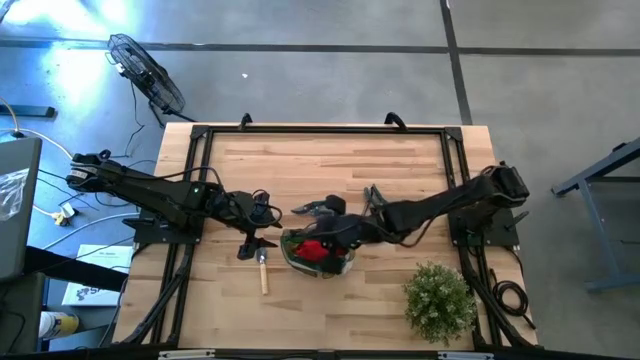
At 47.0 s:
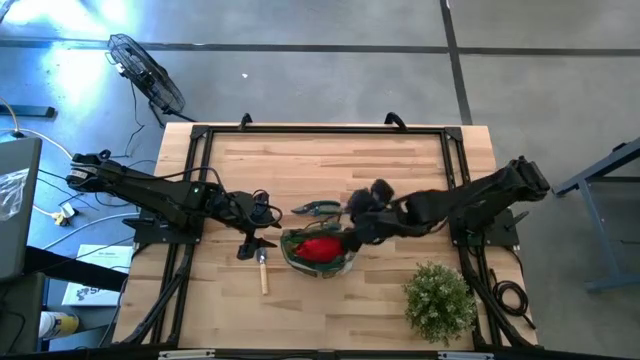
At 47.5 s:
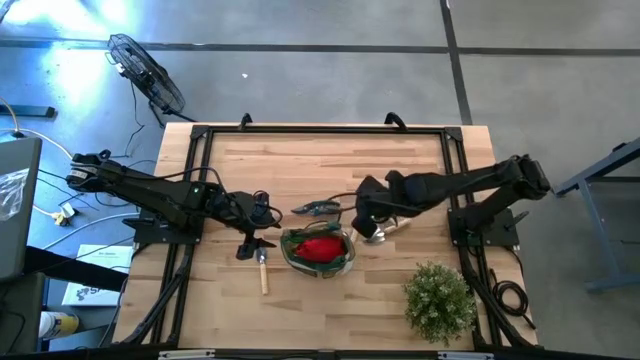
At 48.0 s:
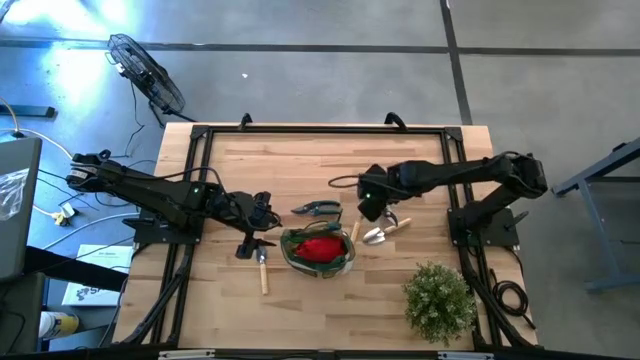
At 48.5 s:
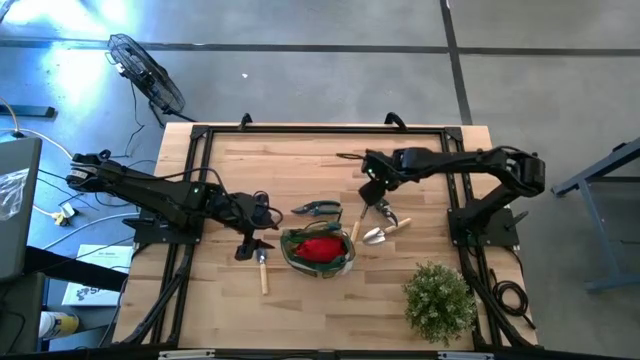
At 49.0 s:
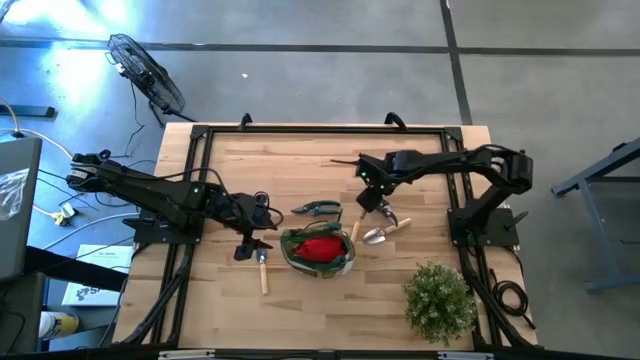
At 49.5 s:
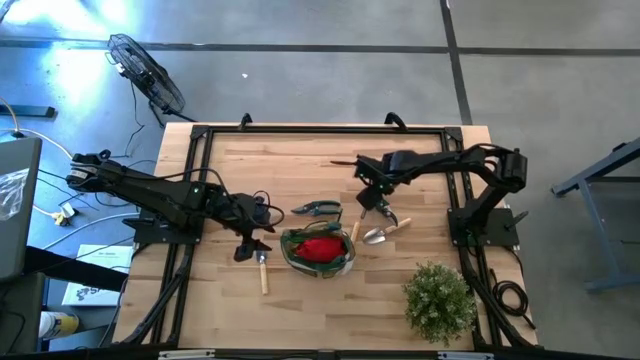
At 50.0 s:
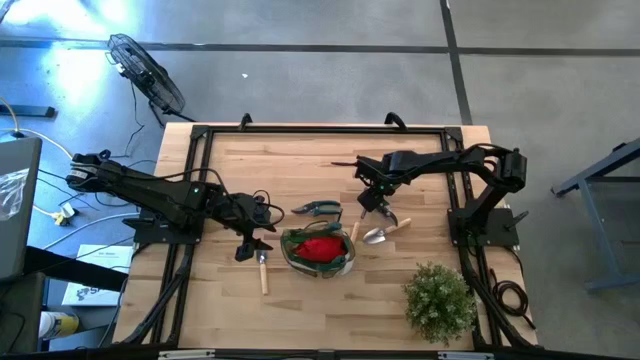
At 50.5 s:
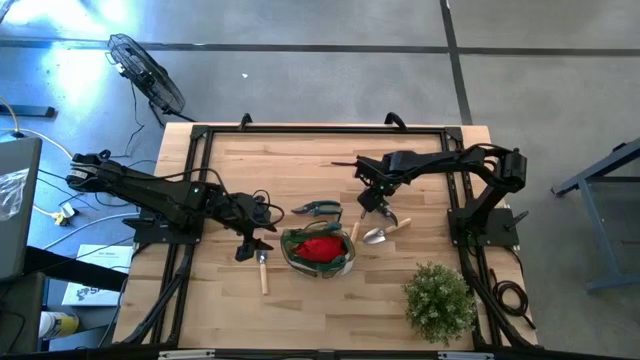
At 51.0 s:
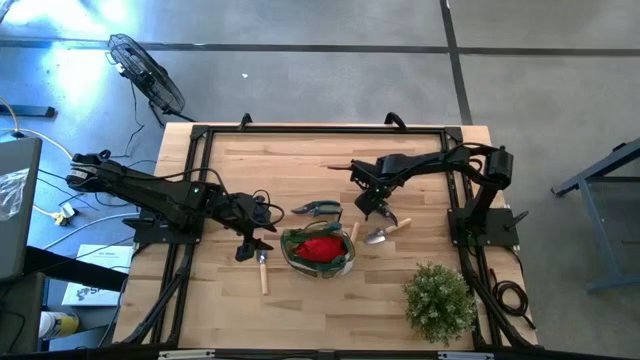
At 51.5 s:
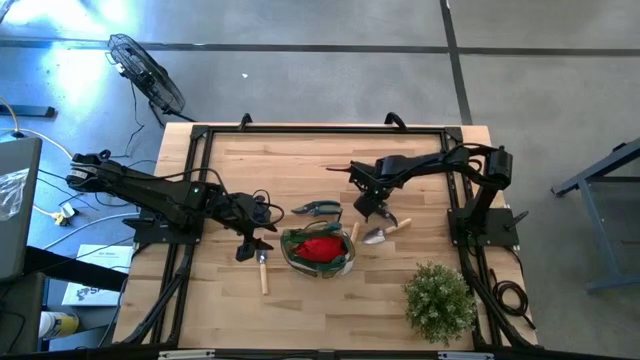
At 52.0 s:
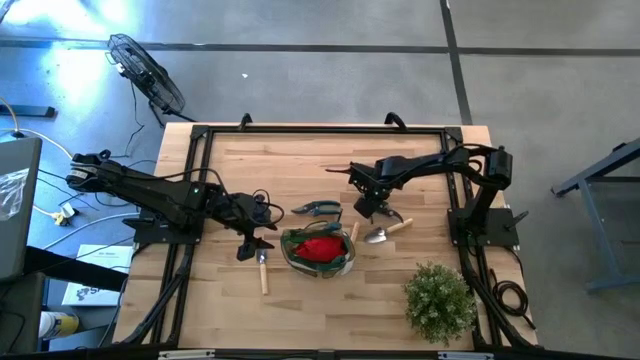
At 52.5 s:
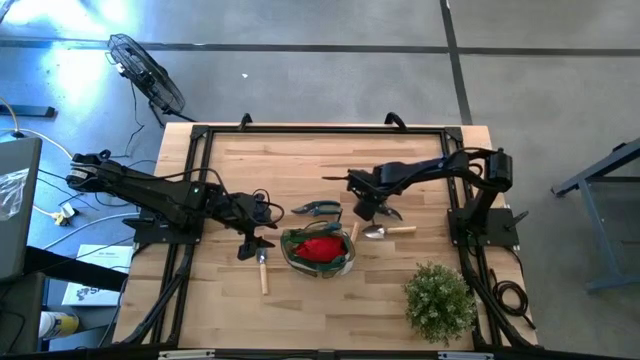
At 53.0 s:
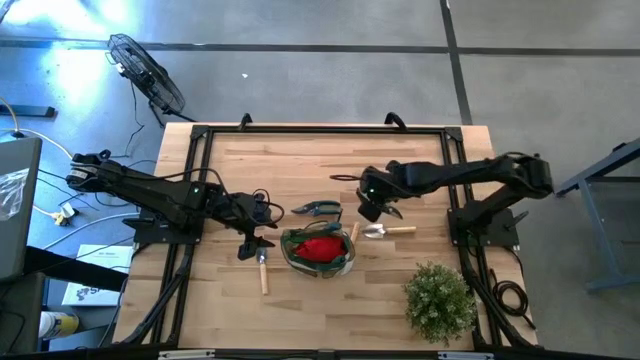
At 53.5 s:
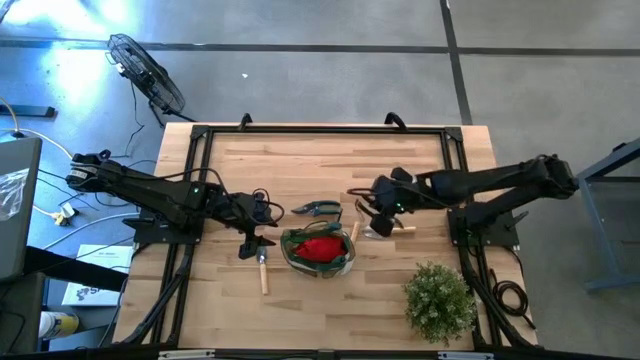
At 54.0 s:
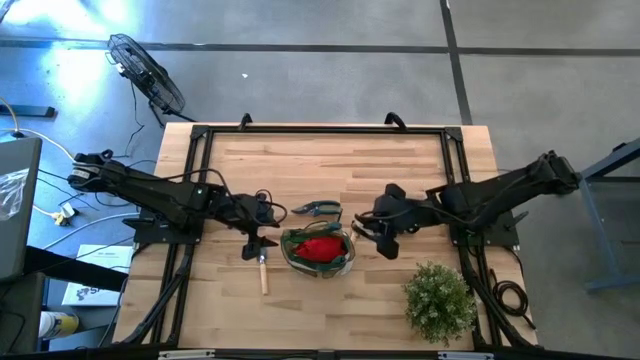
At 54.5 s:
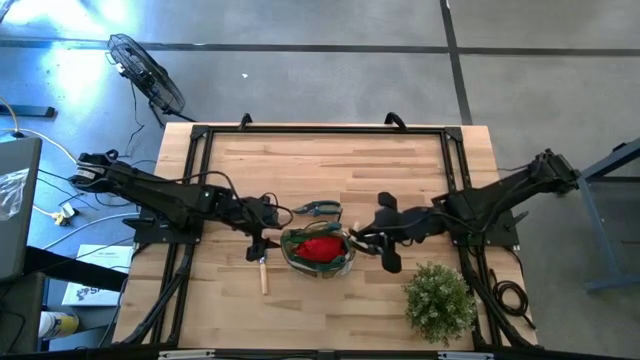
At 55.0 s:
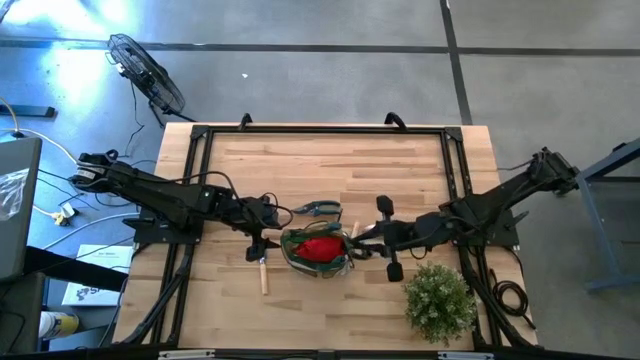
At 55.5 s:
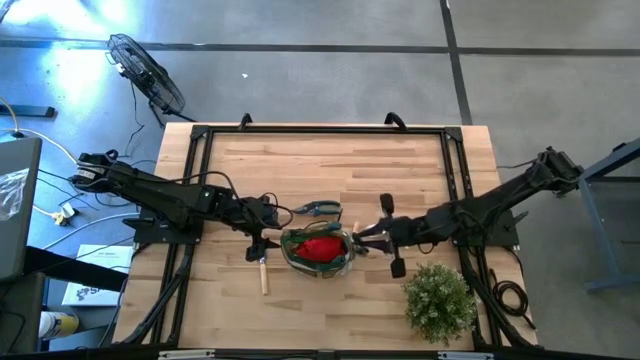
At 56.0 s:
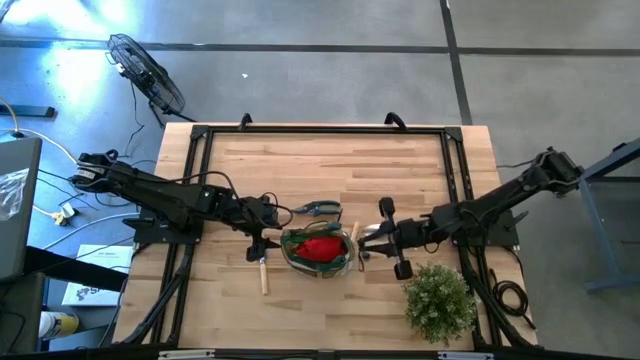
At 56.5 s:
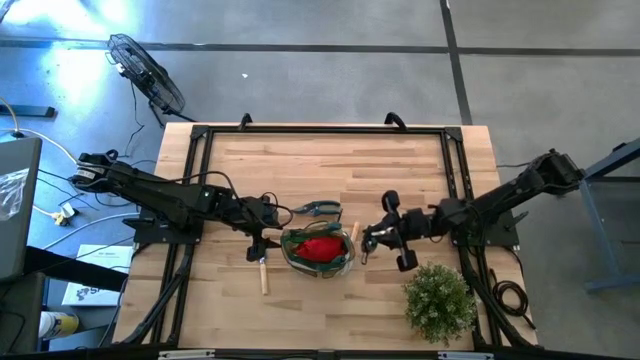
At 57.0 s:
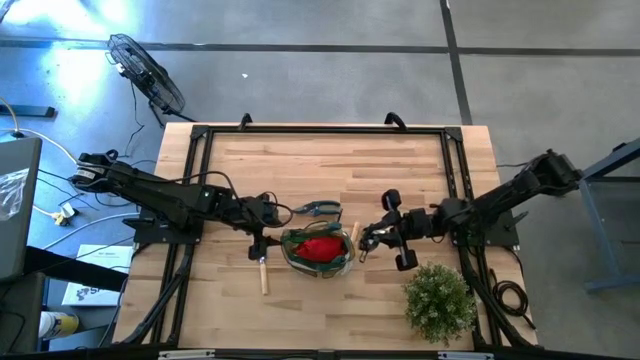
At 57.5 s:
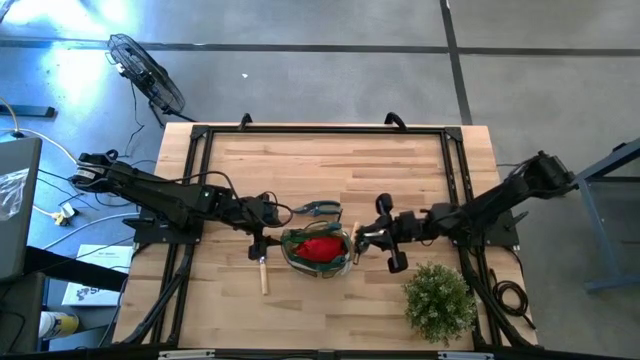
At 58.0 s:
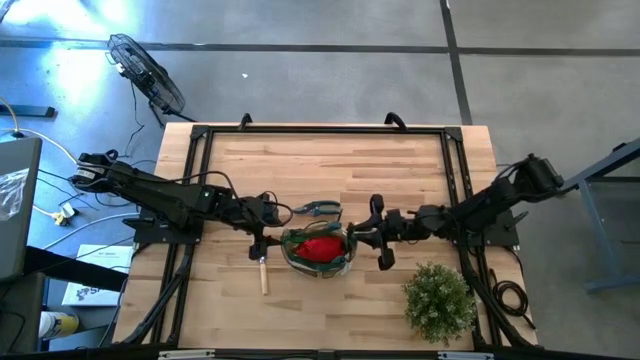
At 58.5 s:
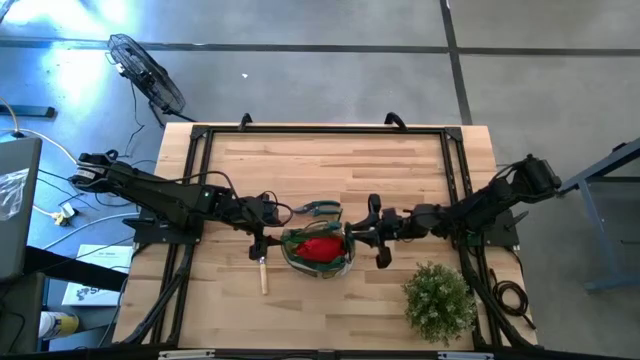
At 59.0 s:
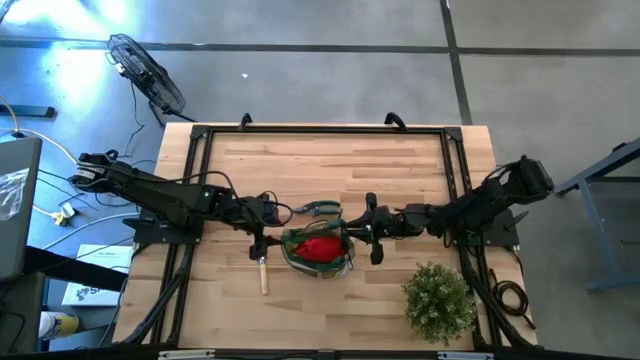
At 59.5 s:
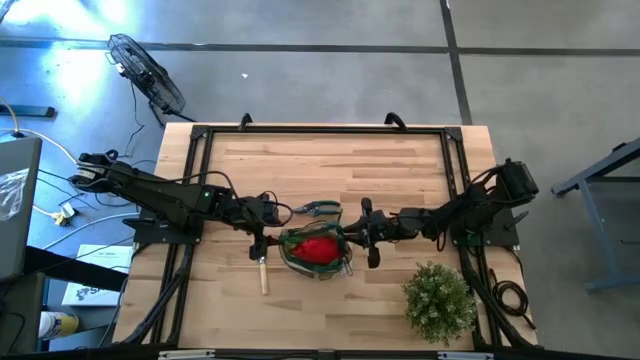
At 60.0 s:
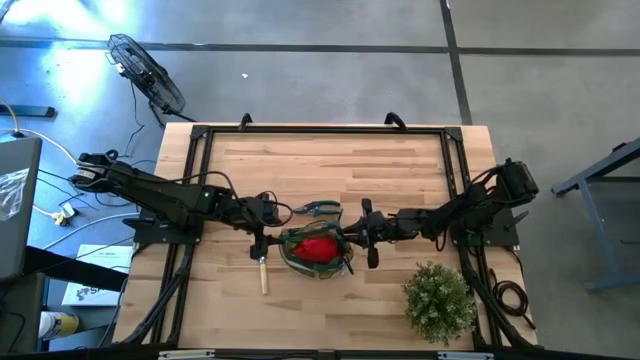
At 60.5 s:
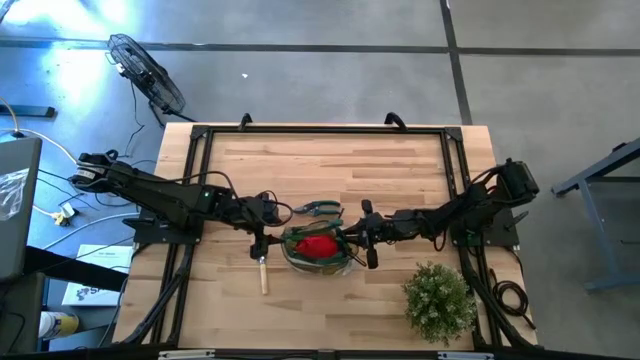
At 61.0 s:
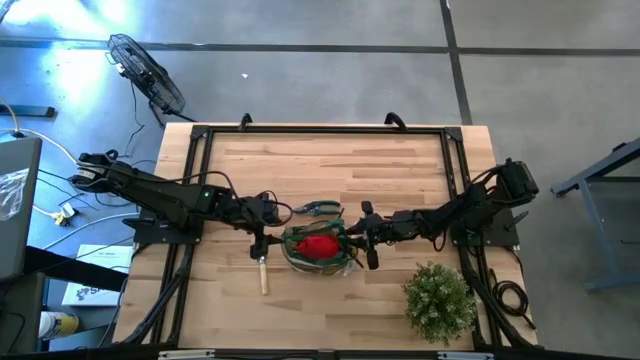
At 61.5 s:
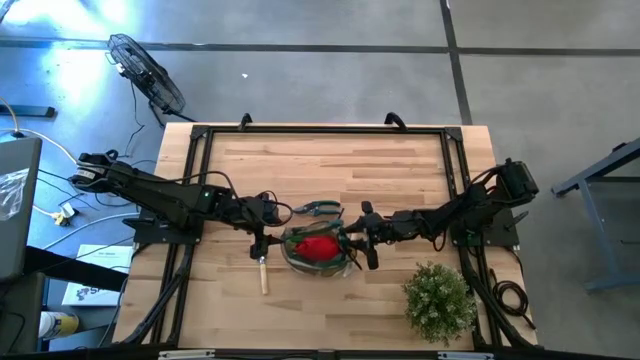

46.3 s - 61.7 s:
Task: Pick & Place Garden tools in Gardening bag
Put the right green shear scissors into the green gardening bag

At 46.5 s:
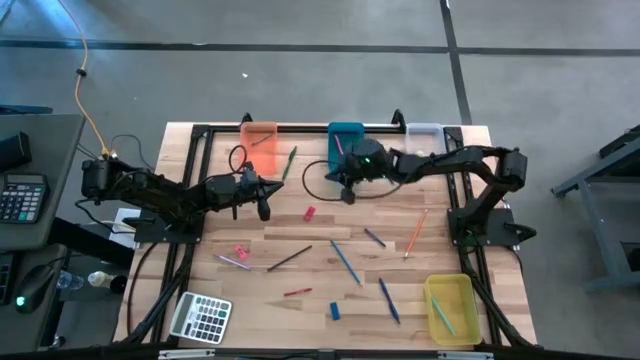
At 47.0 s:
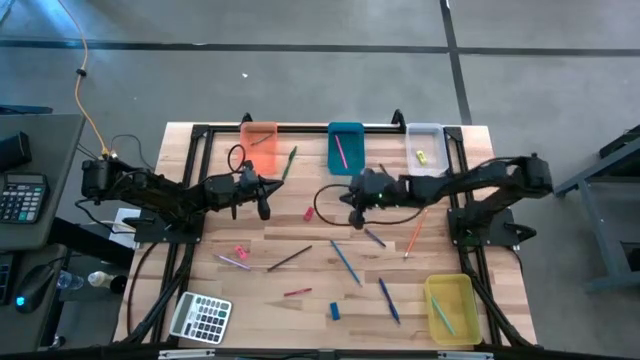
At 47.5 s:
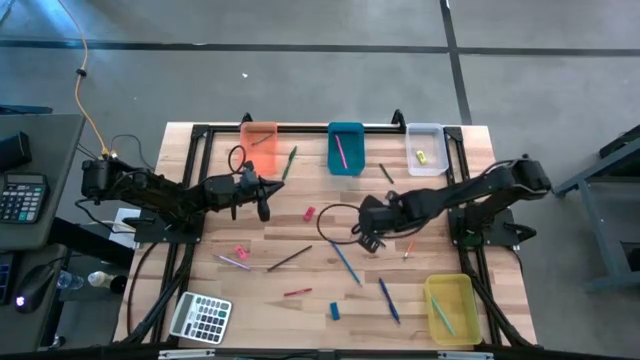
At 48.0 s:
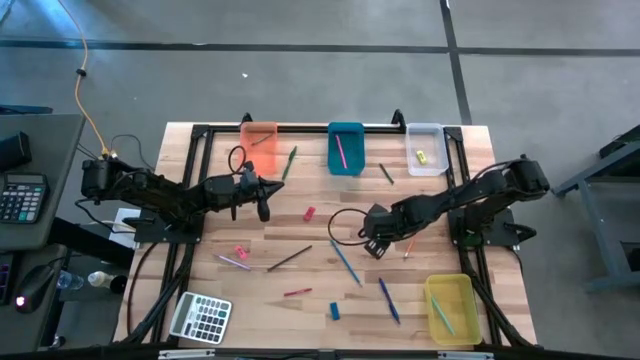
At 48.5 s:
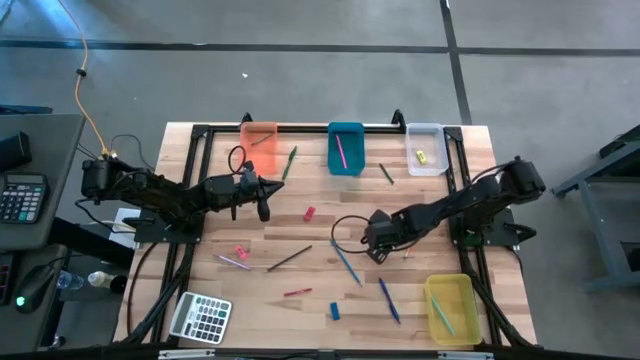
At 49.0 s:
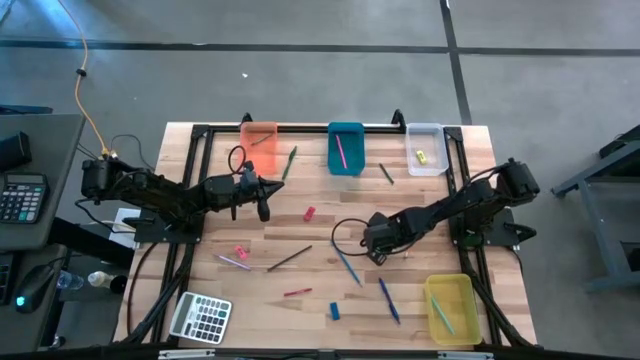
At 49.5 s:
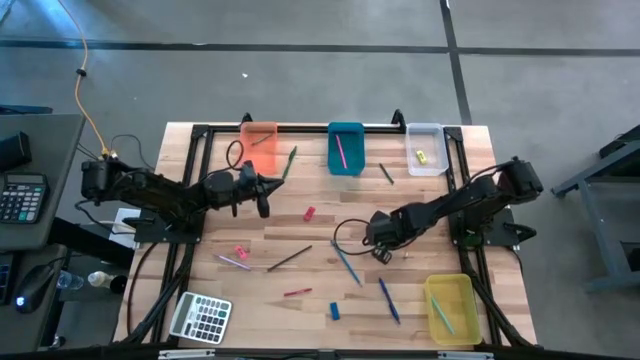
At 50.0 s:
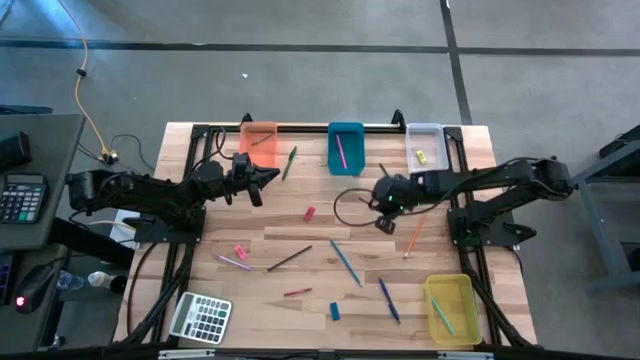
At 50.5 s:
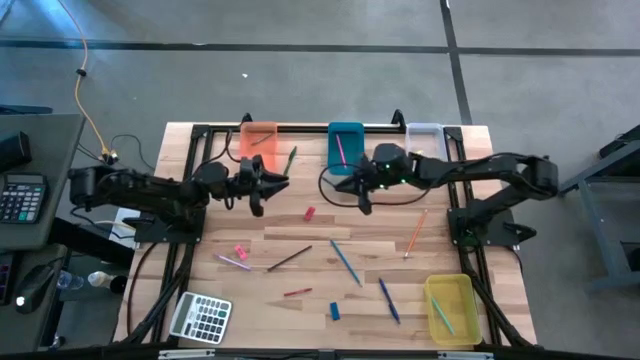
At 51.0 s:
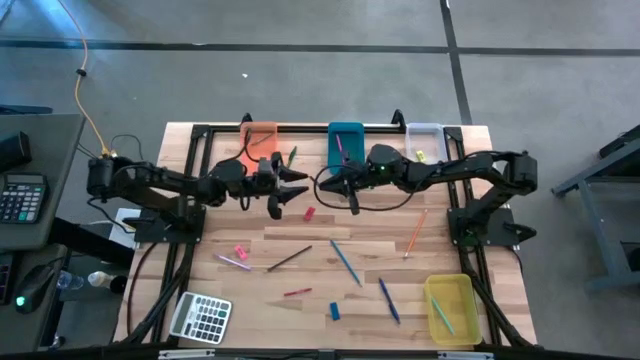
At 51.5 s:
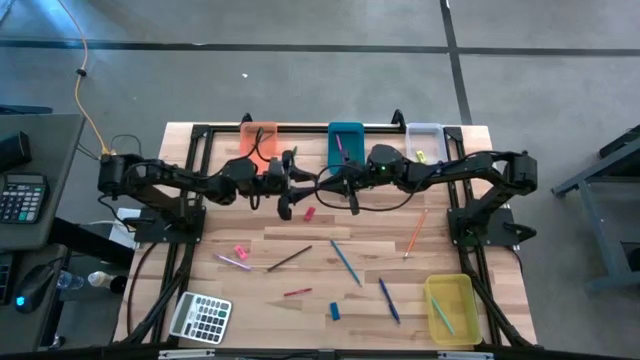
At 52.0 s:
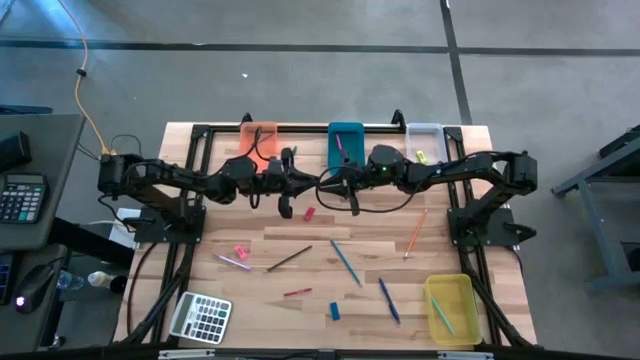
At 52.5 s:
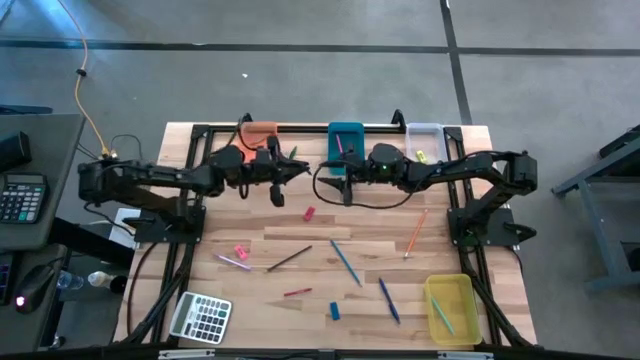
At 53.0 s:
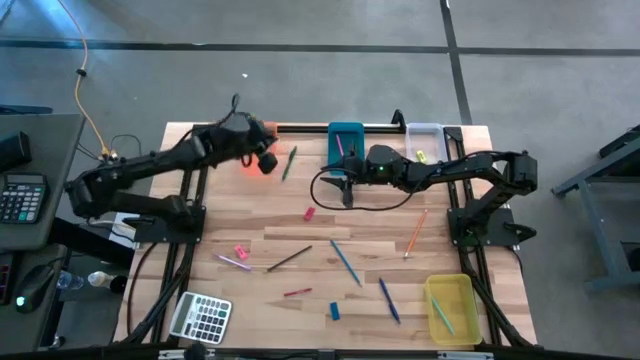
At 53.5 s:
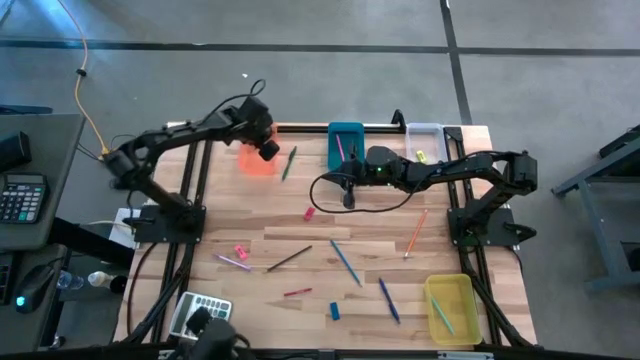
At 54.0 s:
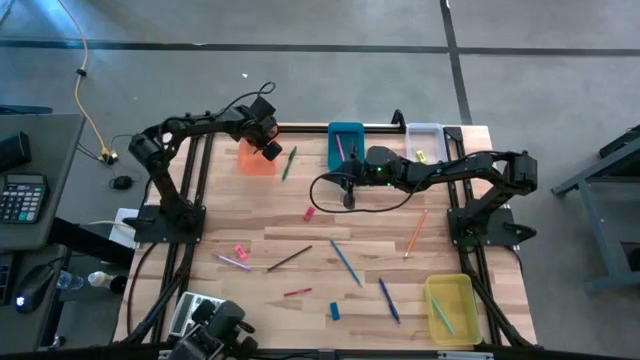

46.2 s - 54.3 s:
Task: Sort crayons/erasers/pens/pencils in bins
Put the blue crayon into the orange bin
